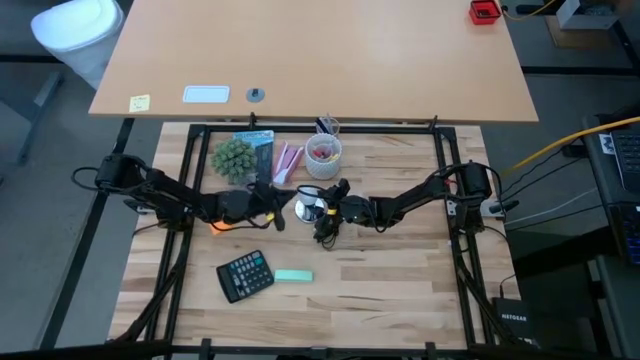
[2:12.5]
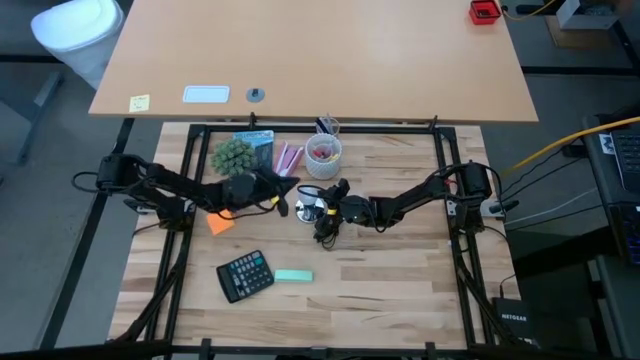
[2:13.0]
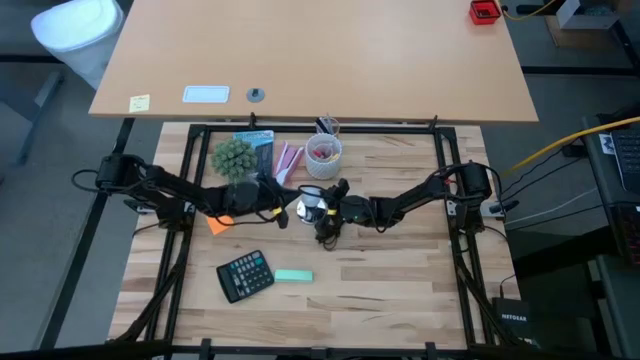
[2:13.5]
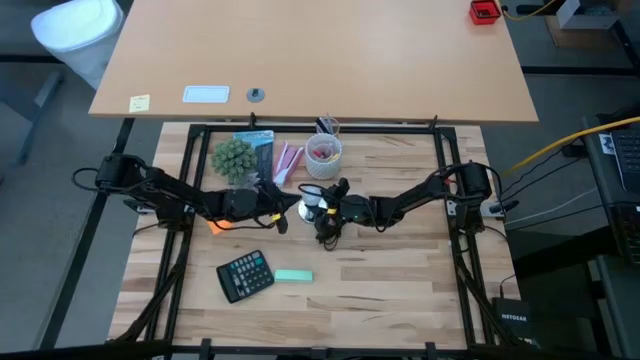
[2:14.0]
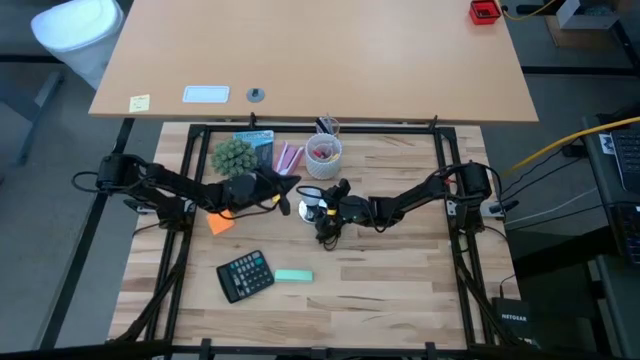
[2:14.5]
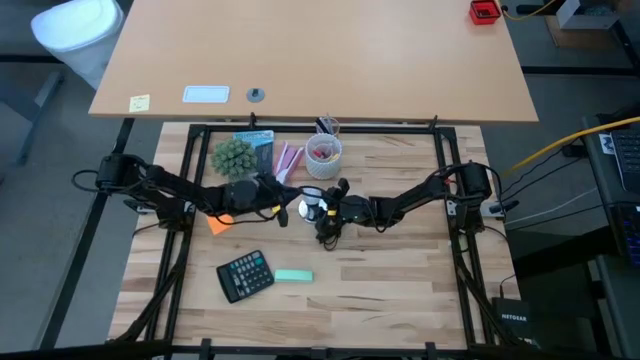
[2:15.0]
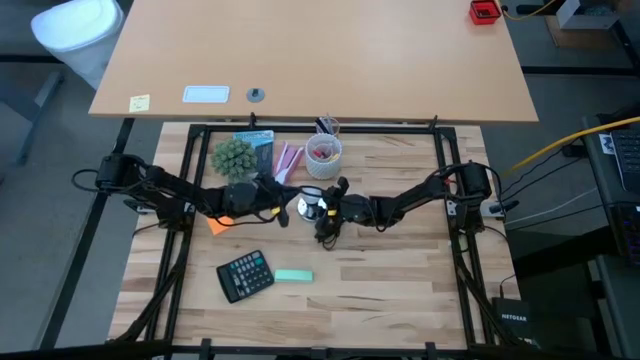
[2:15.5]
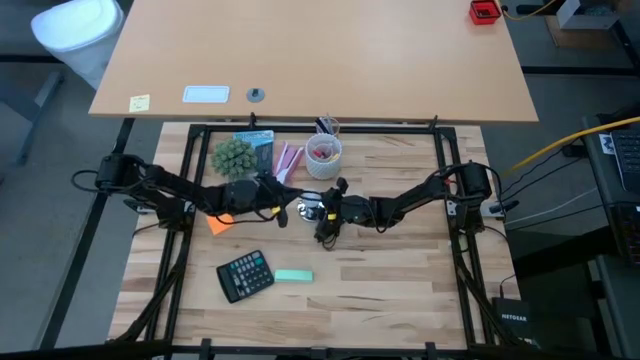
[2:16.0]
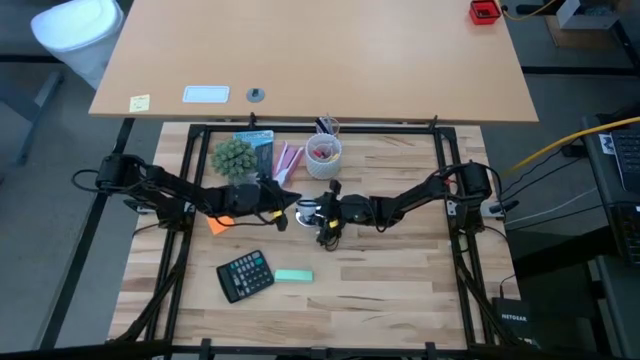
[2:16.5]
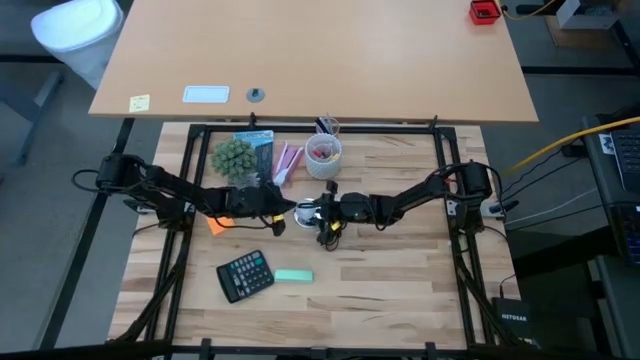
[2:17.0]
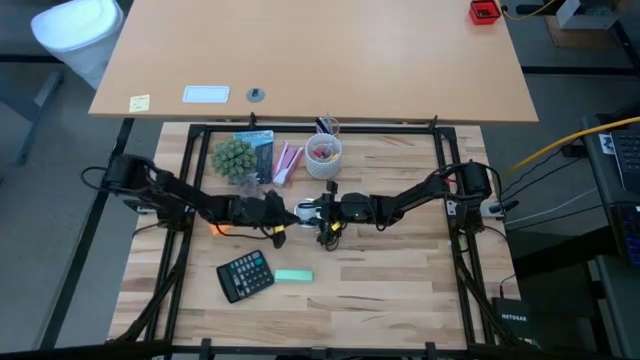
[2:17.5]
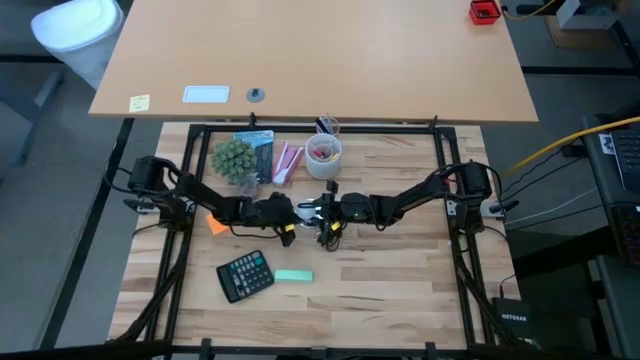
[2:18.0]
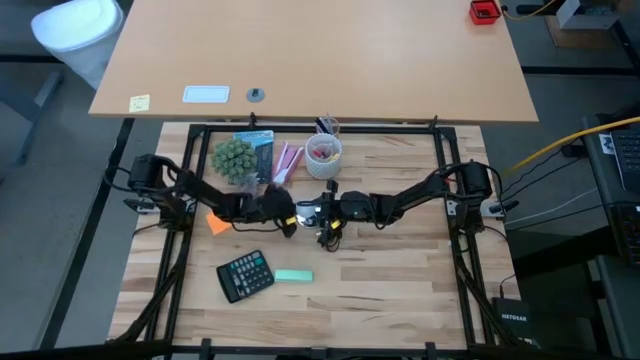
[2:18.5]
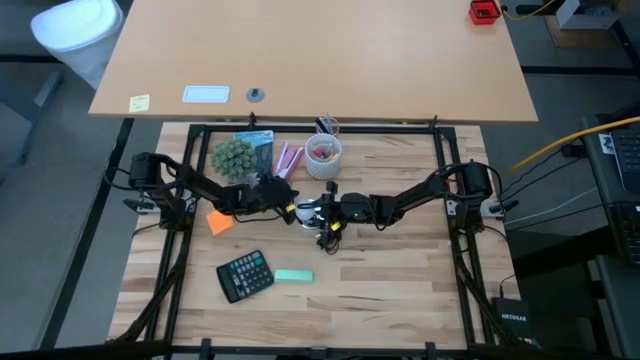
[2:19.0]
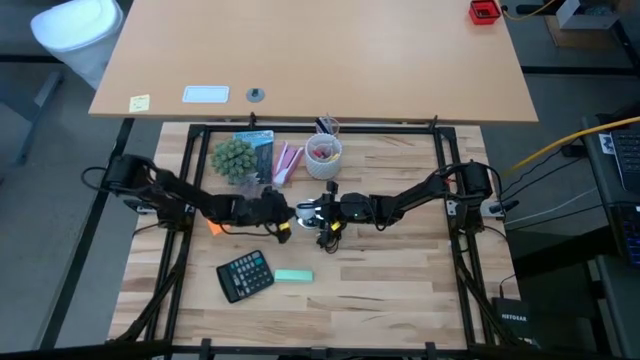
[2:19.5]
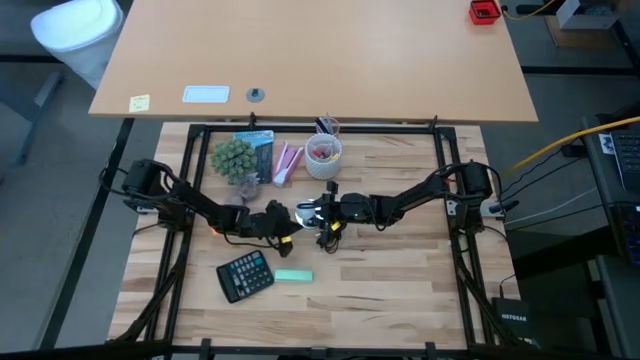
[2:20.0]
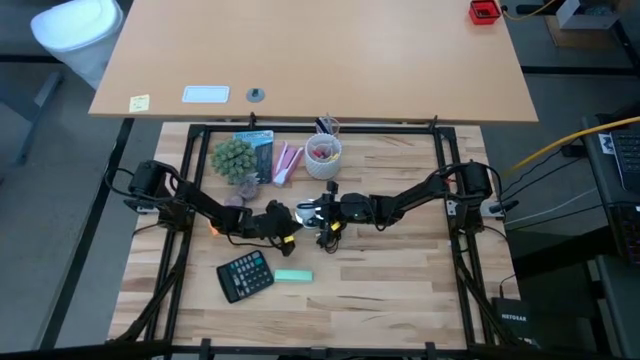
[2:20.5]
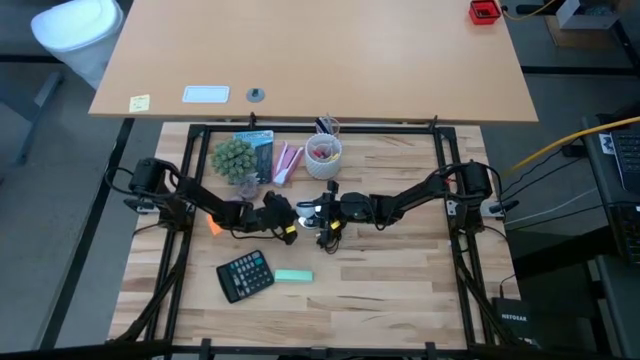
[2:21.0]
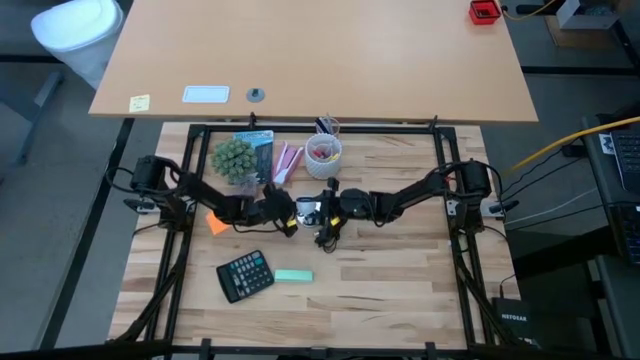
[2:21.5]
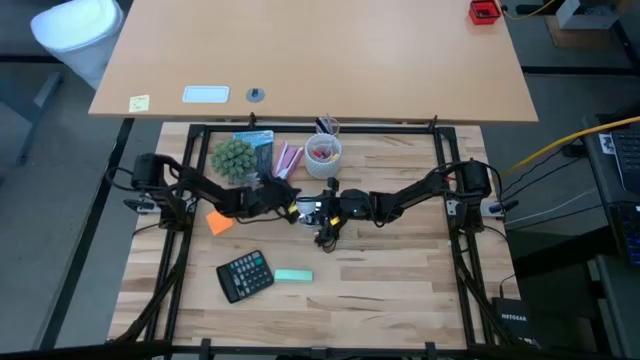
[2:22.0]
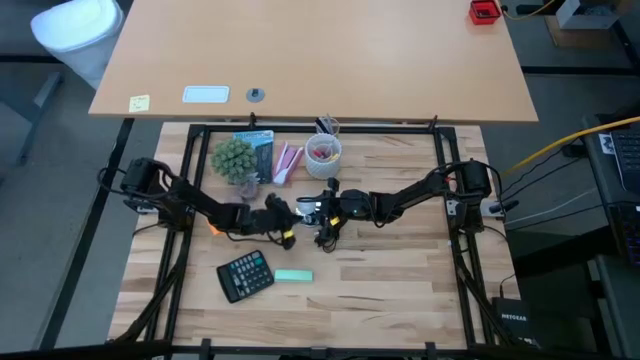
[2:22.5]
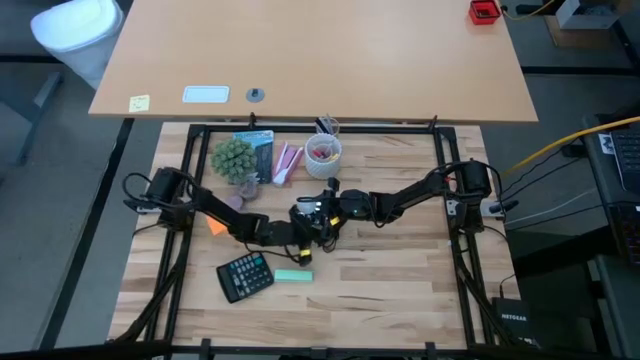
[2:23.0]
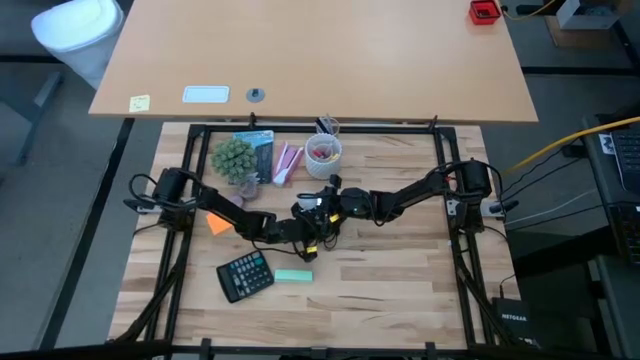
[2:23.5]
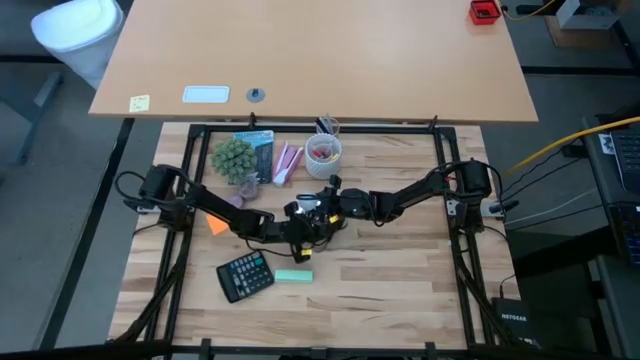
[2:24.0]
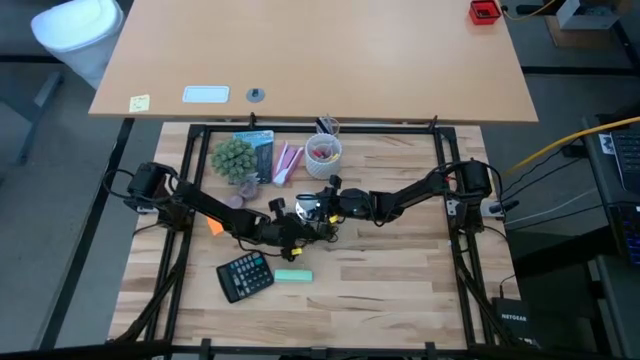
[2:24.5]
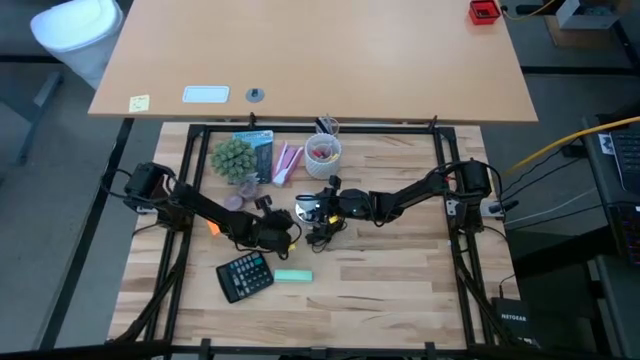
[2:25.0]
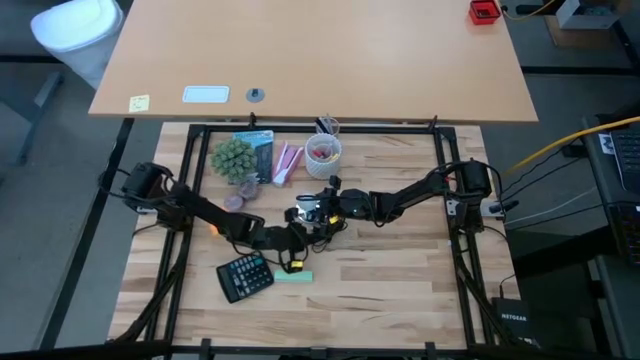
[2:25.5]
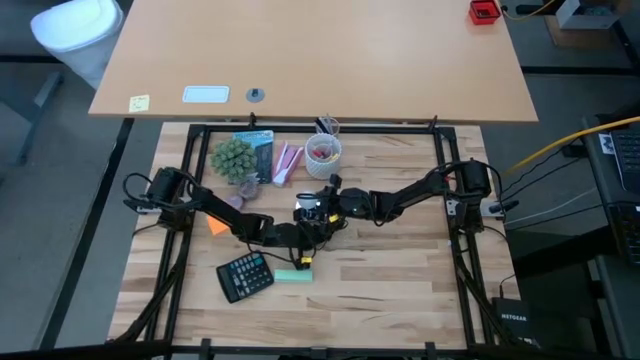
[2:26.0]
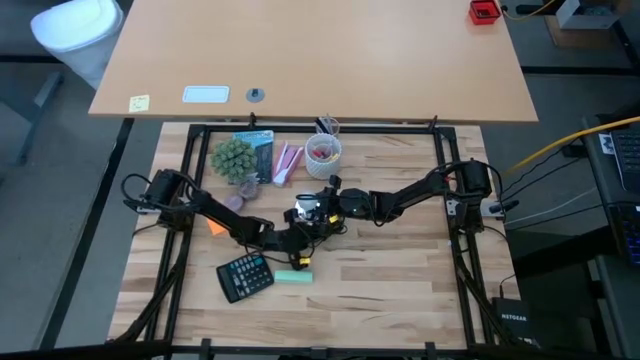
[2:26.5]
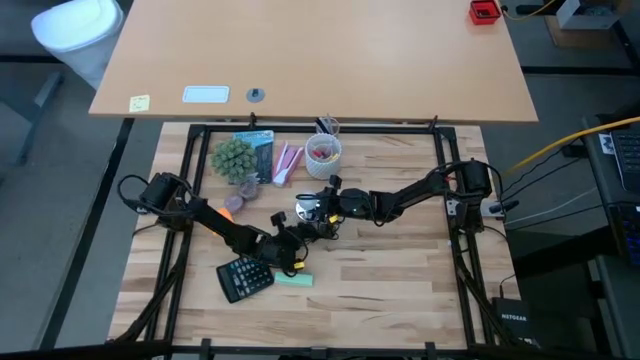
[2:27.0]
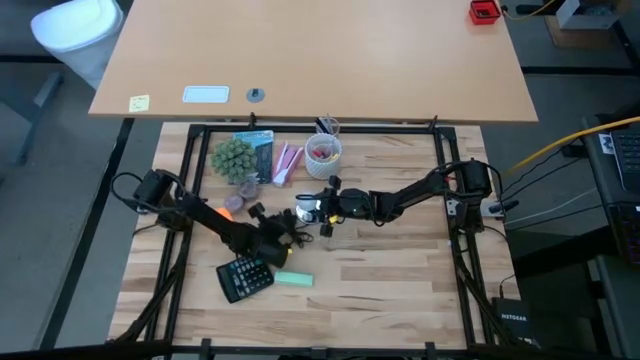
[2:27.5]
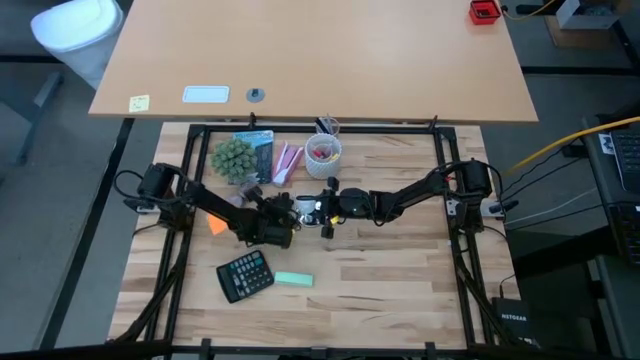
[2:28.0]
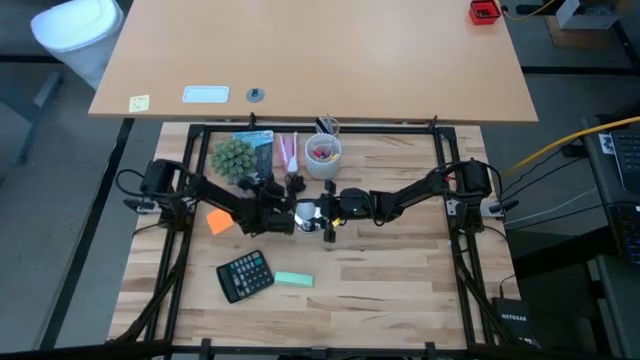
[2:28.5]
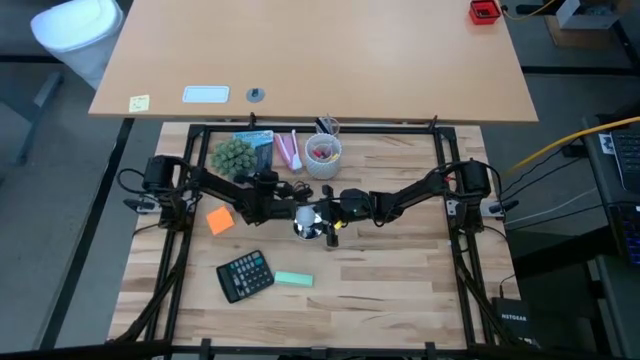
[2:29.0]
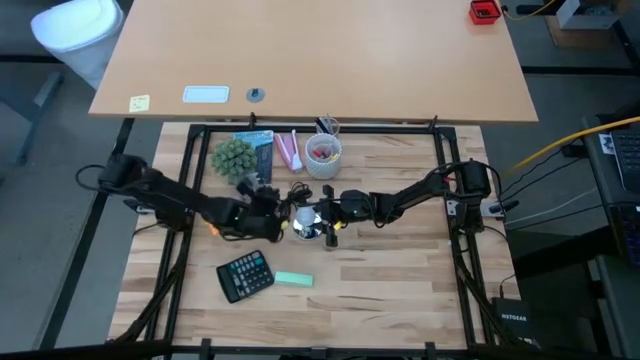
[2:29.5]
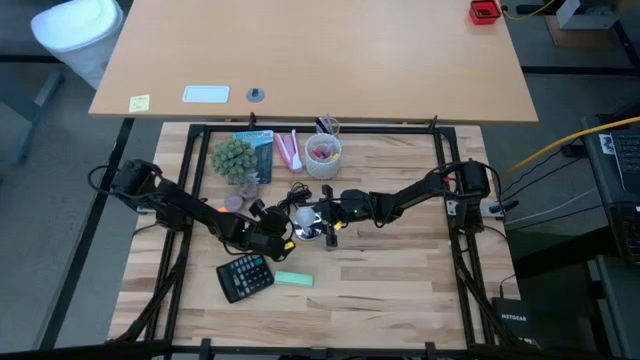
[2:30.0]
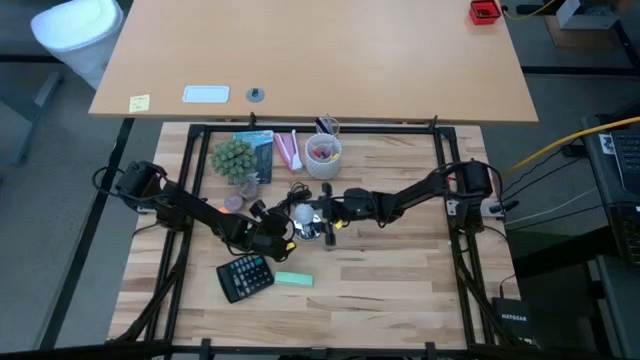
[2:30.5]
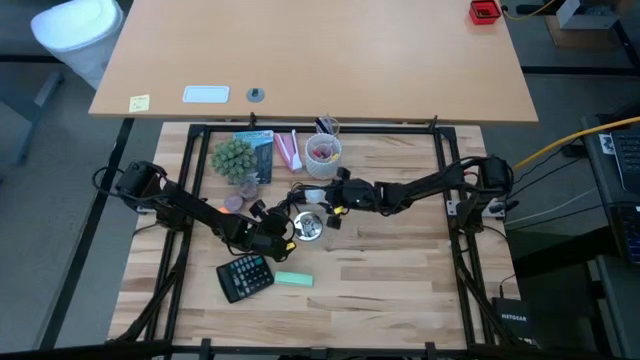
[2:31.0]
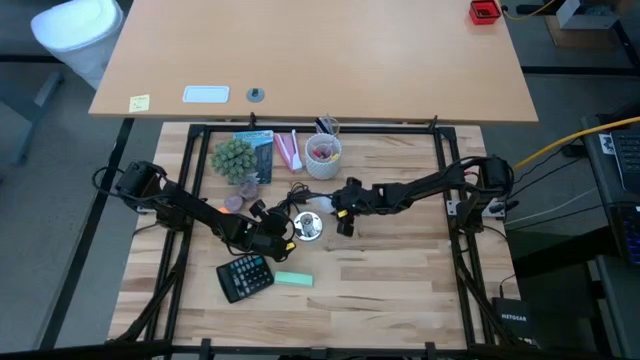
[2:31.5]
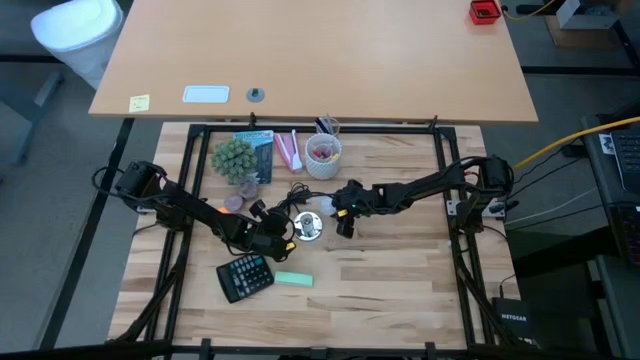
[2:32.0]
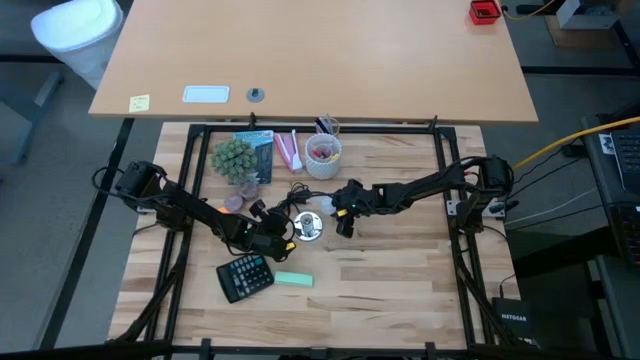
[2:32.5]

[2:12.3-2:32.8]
Task: Screw lightbulb
Remove the lightbulb from the lamp
